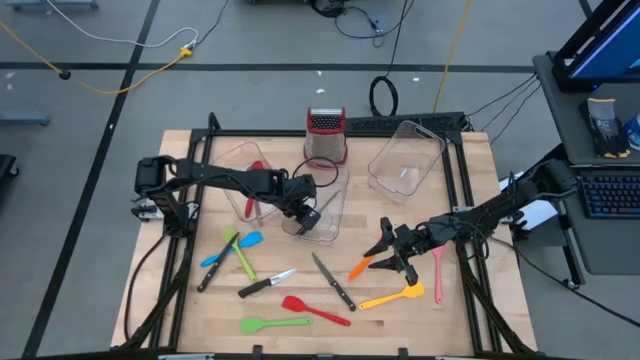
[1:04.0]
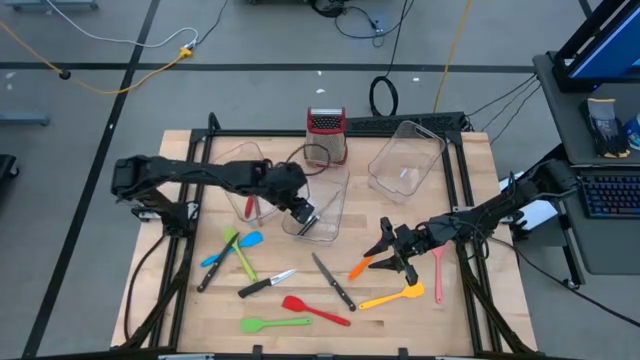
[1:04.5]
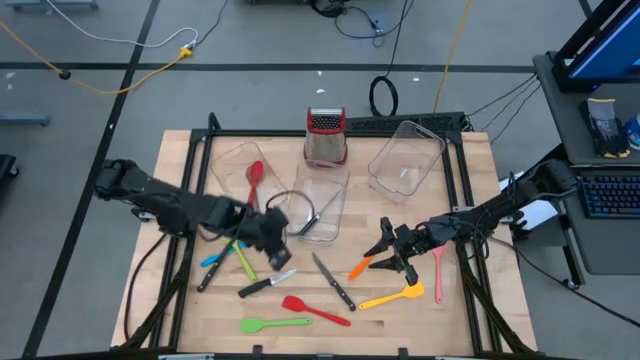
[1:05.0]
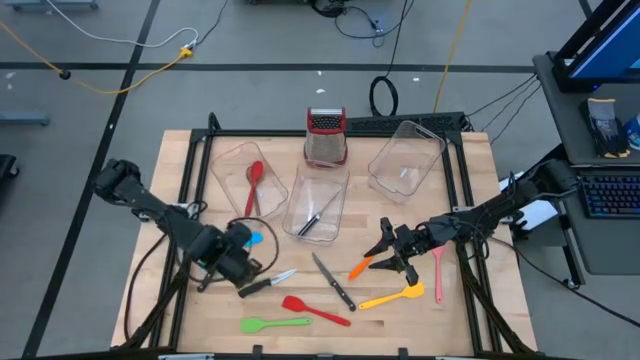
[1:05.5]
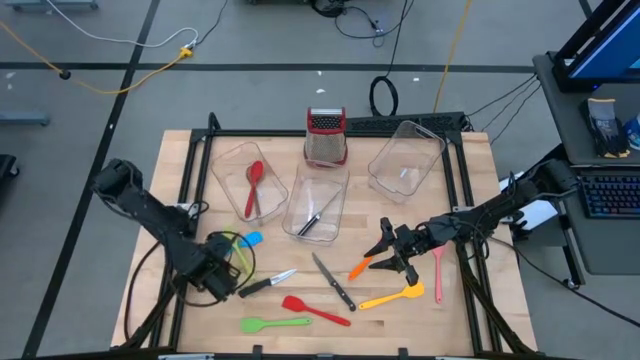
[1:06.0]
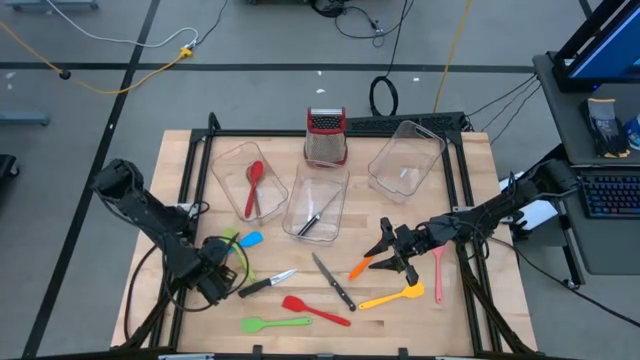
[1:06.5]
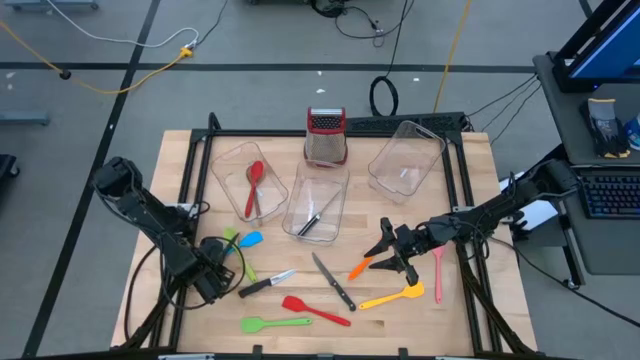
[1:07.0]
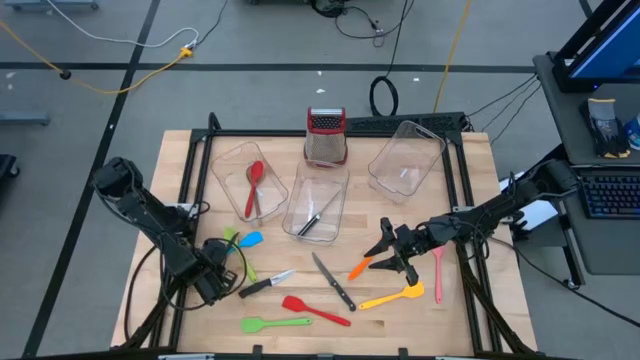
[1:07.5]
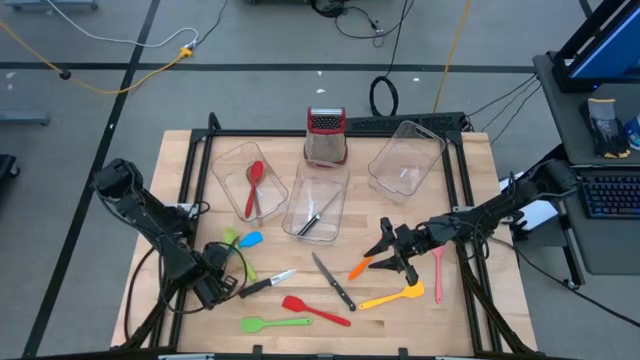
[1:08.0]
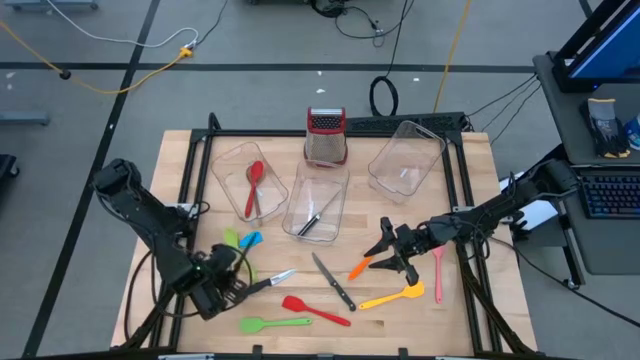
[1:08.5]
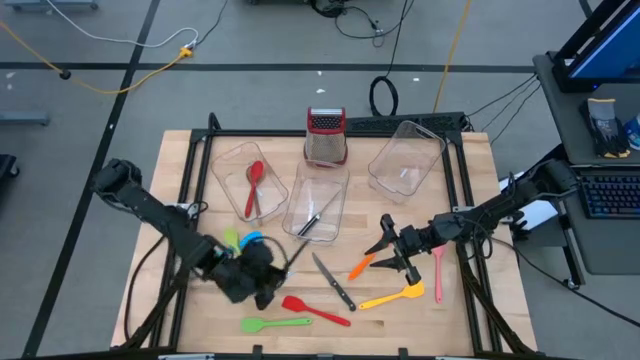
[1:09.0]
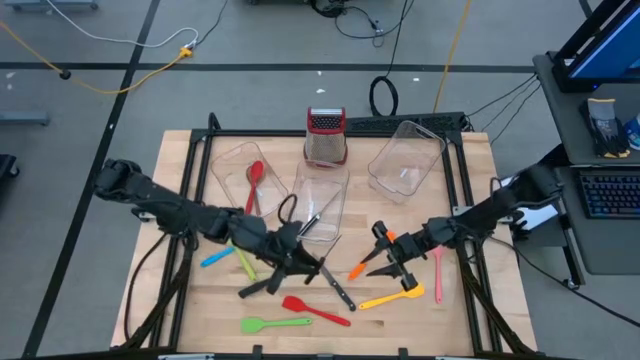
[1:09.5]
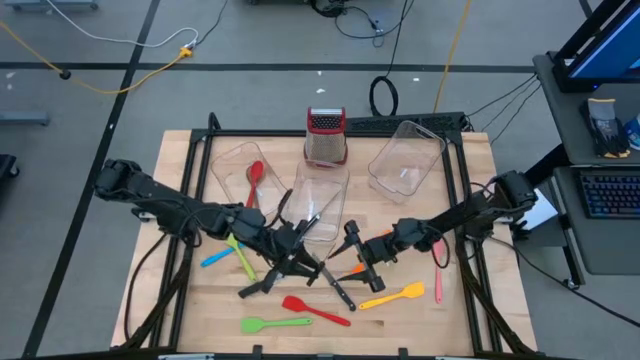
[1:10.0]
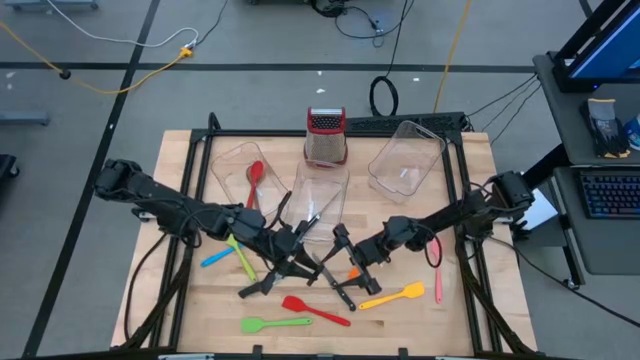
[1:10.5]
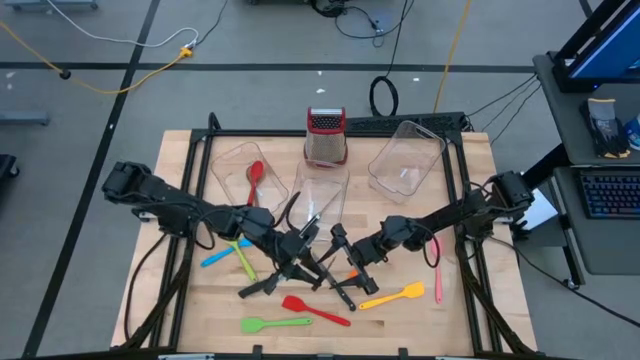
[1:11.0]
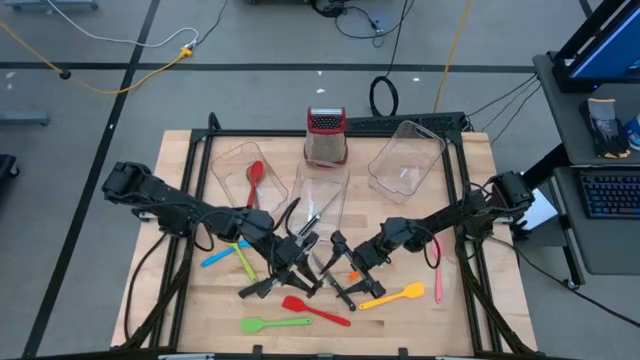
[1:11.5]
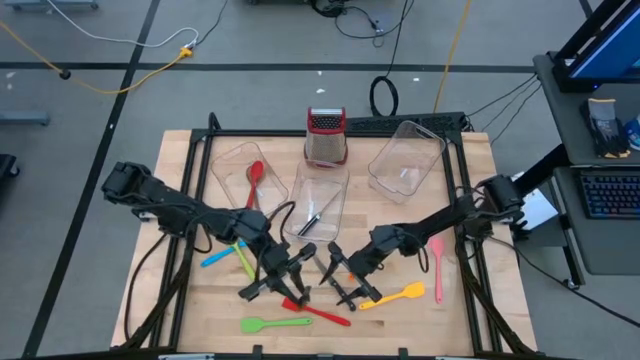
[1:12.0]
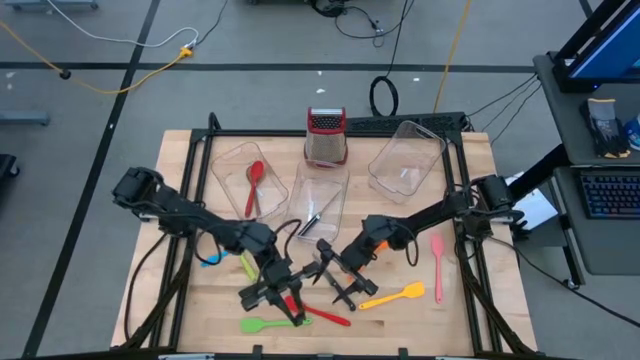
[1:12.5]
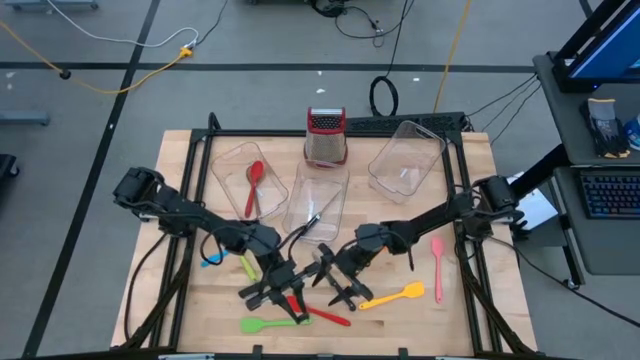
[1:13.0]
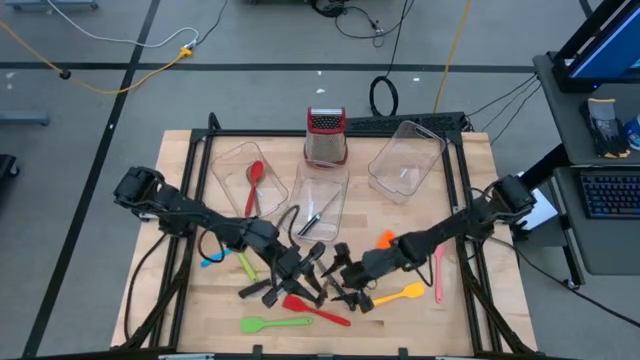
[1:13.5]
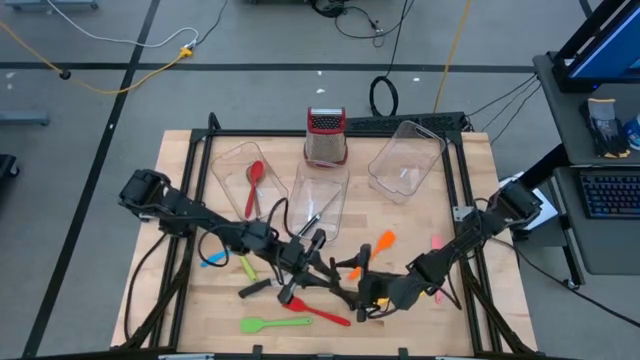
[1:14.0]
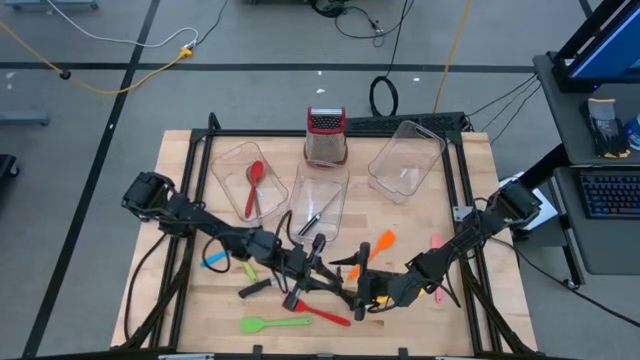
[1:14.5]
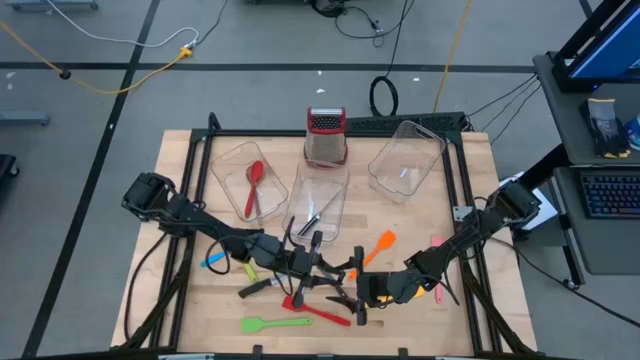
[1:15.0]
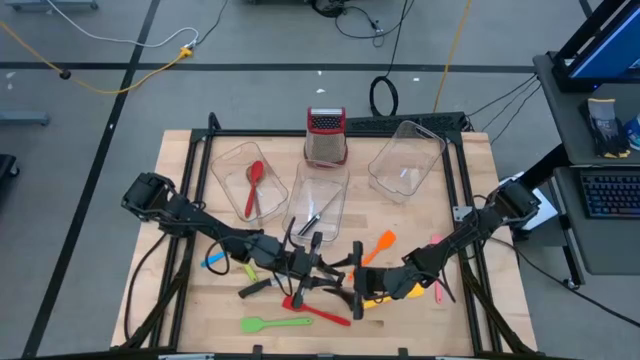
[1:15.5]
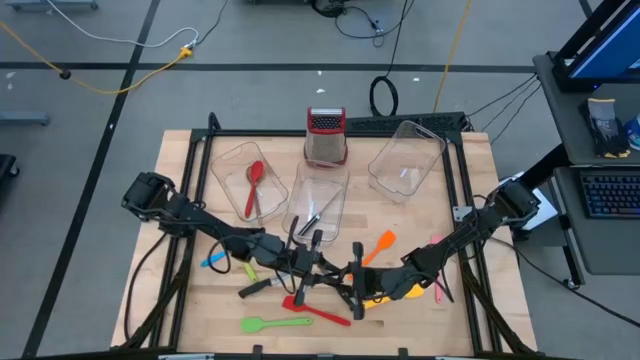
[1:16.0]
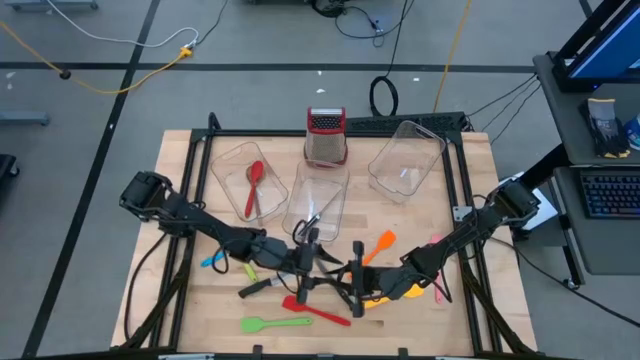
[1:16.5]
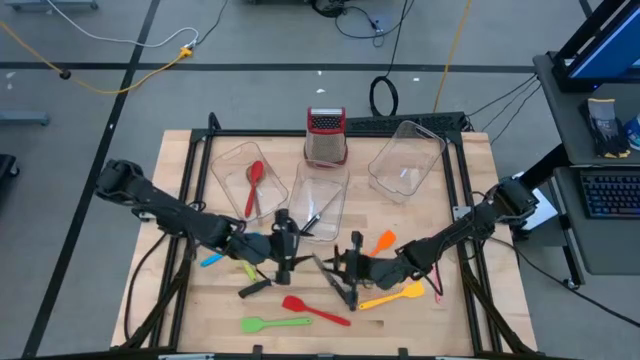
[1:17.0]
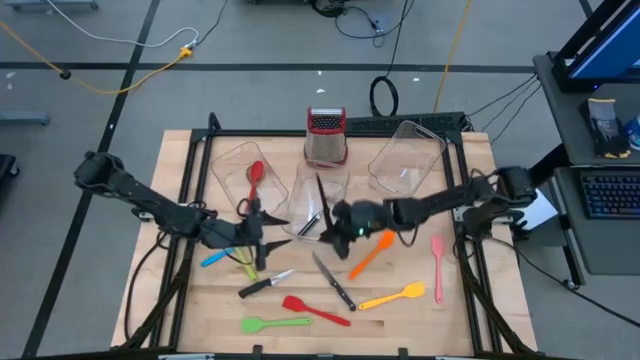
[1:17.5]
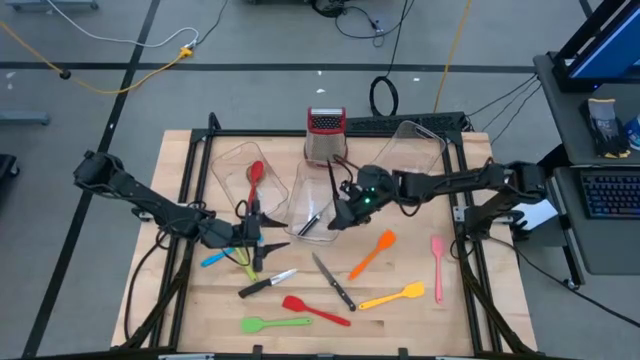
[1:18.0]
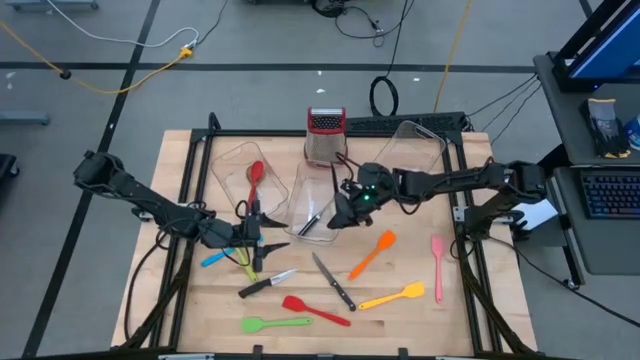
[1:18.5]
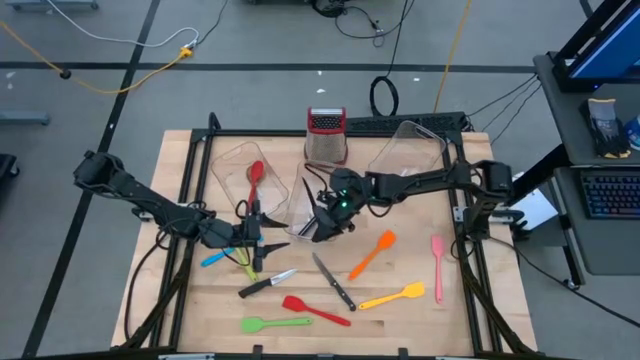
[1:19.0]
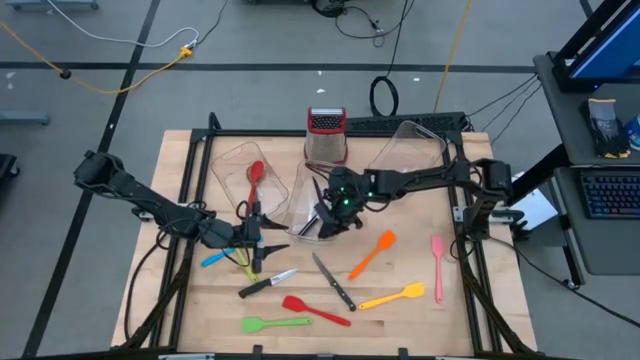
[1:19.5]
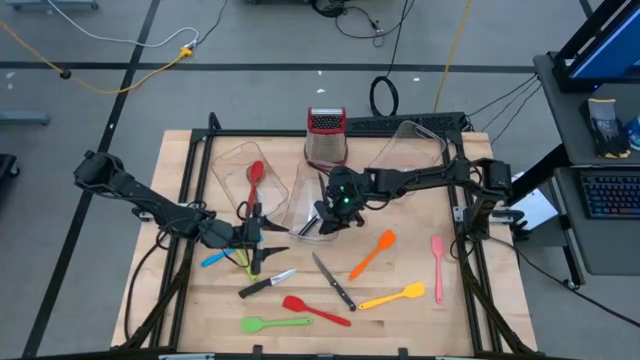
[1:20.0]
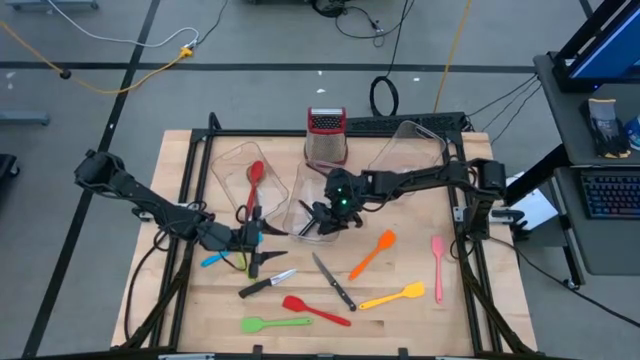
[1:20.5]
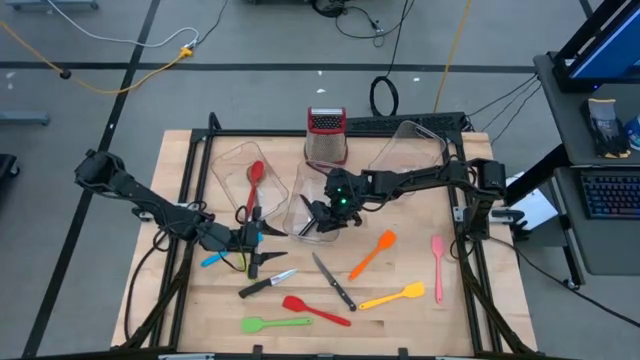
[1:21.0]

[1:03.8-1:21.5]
Task: Pick & Place Kitchen Items
Put the black knife into the middle transparent bin

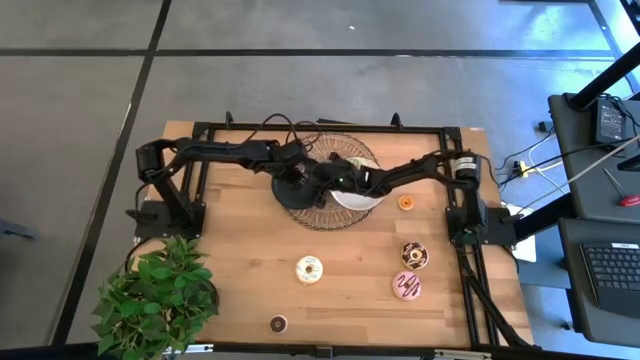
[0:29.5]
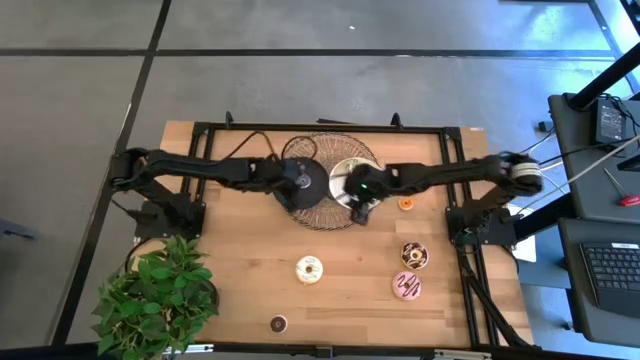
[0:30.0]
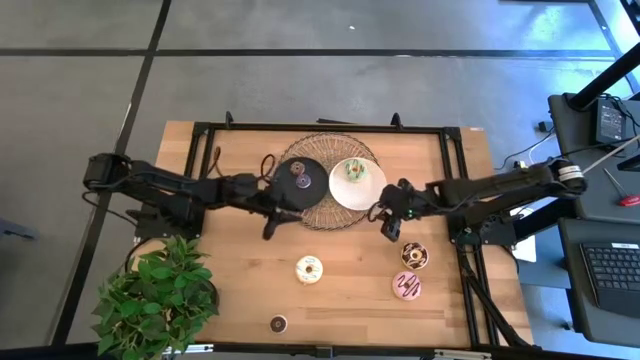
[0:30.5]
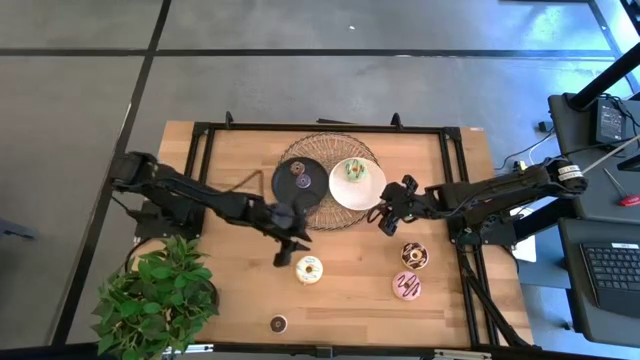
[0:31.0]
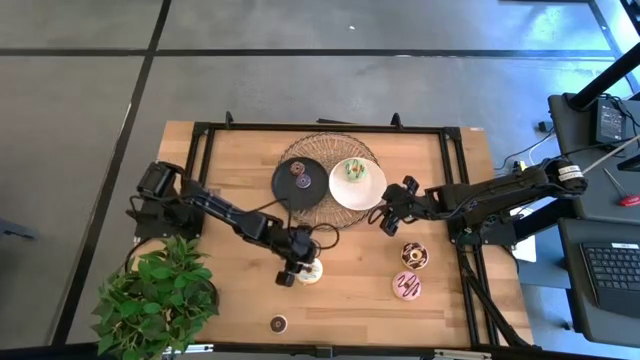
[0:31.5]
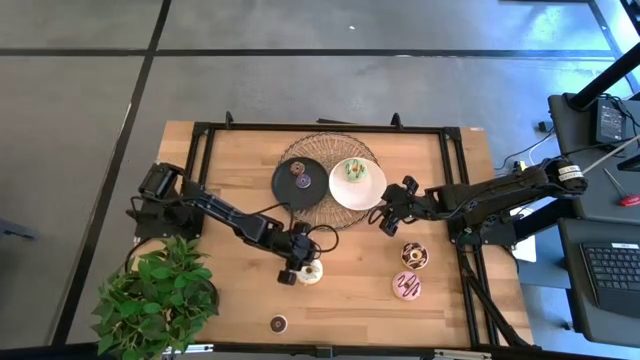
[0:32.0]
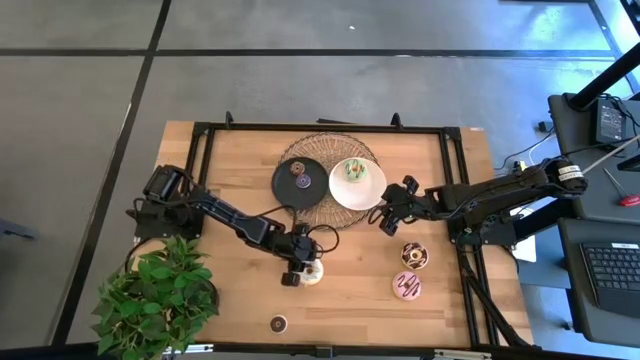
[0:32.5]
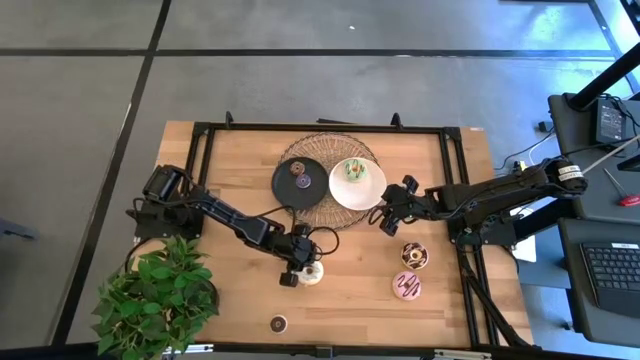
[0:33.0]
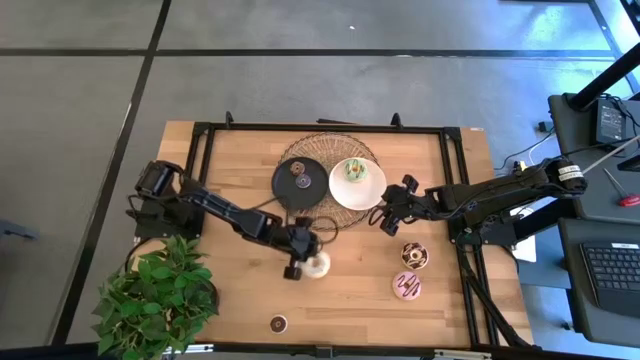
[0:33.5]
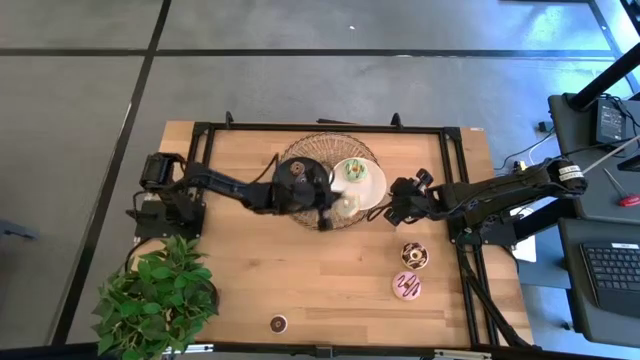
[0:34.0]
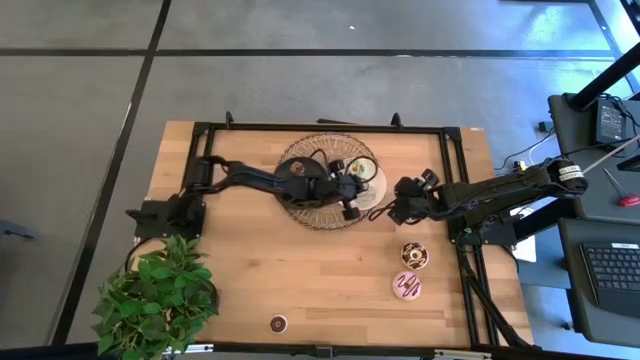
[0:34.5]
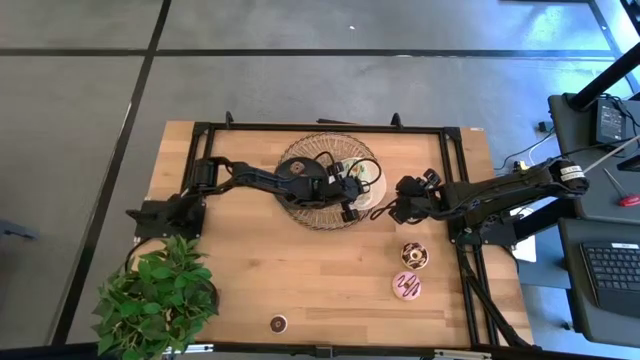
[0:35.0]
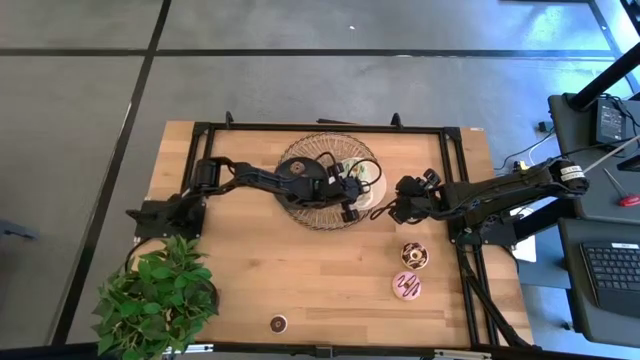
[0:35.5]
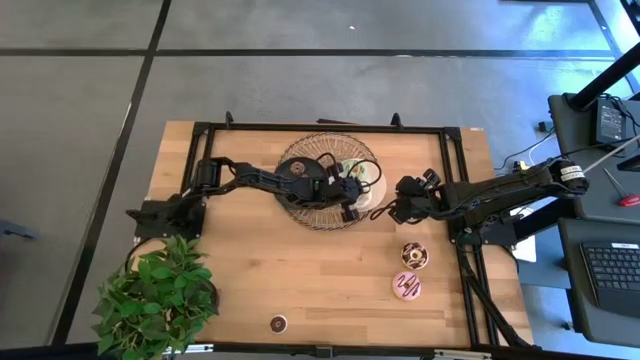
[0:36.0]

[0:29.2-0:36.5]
Task: Pick & Place donuts
Put the big white donut on the white plate
